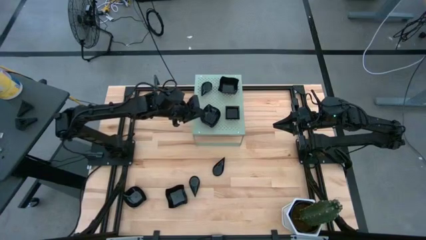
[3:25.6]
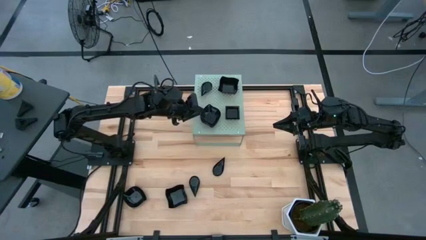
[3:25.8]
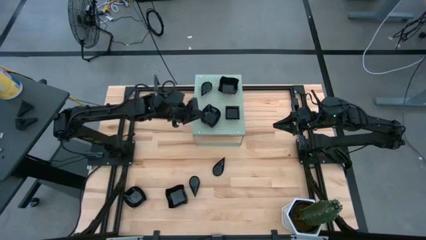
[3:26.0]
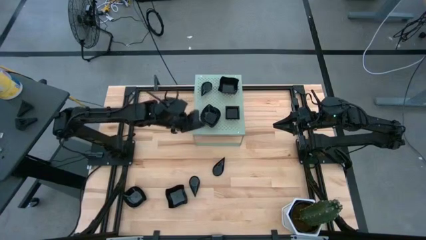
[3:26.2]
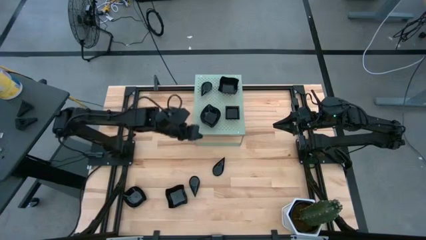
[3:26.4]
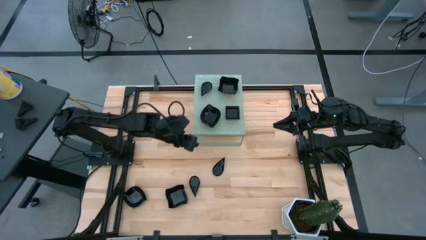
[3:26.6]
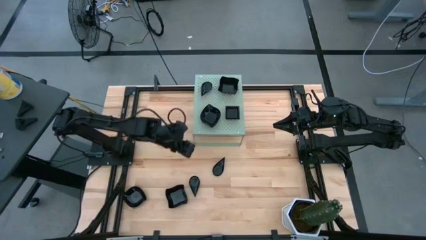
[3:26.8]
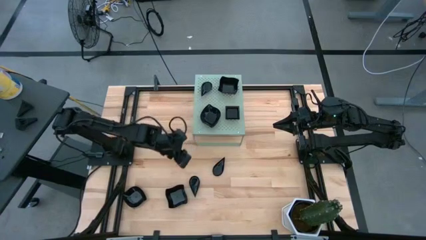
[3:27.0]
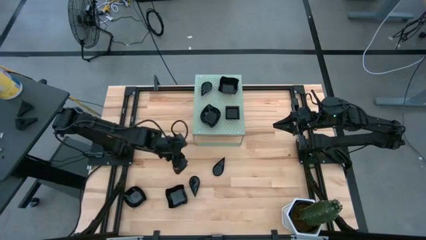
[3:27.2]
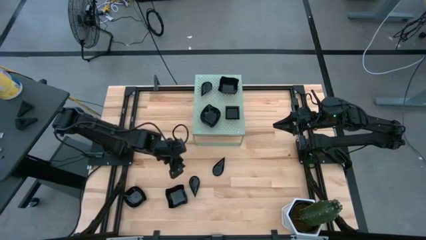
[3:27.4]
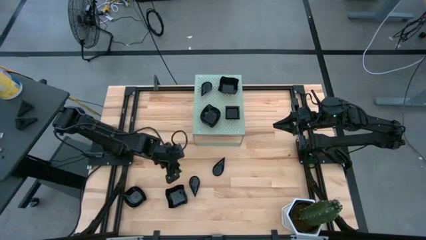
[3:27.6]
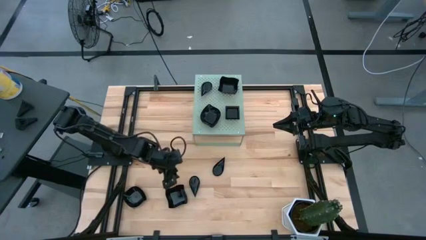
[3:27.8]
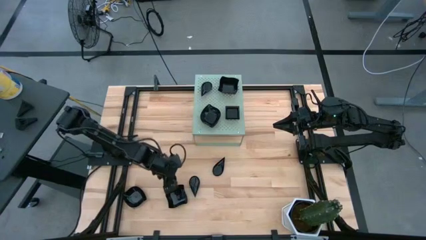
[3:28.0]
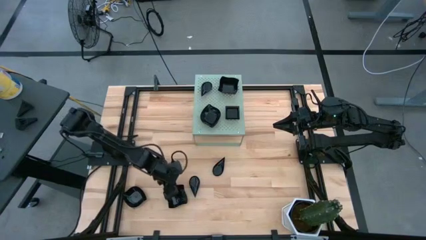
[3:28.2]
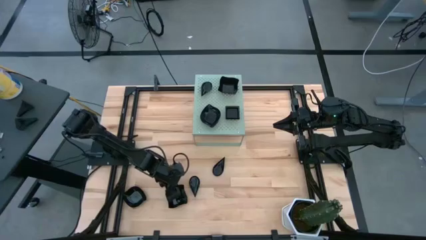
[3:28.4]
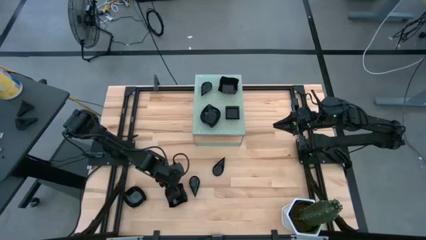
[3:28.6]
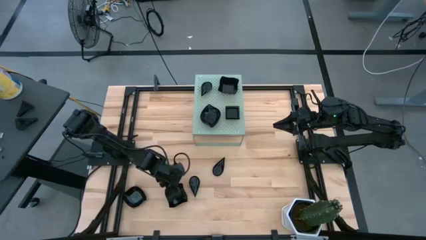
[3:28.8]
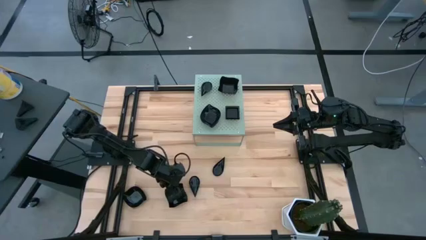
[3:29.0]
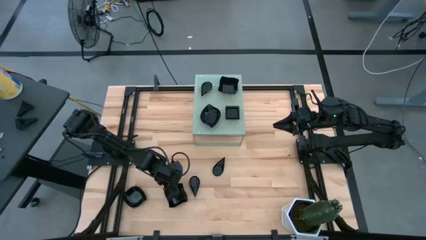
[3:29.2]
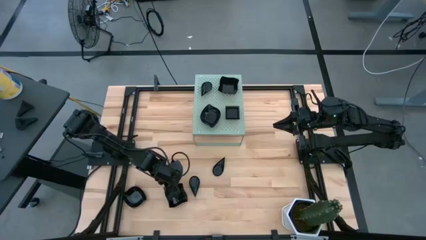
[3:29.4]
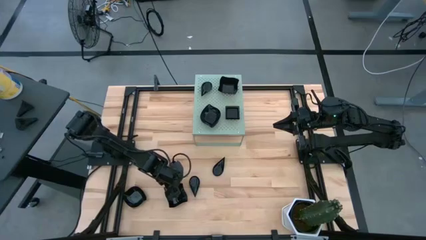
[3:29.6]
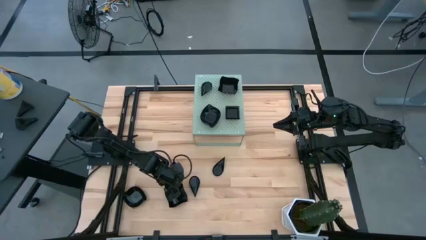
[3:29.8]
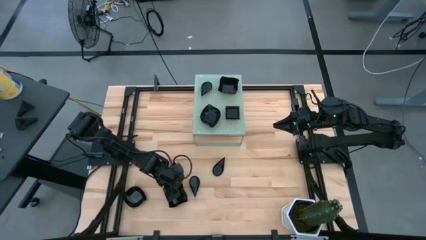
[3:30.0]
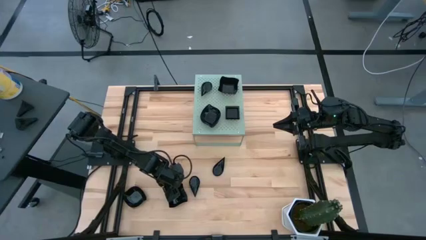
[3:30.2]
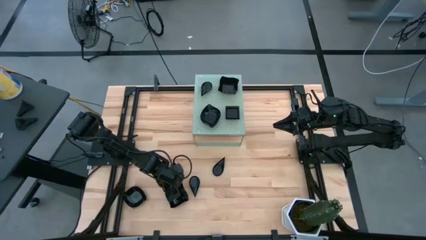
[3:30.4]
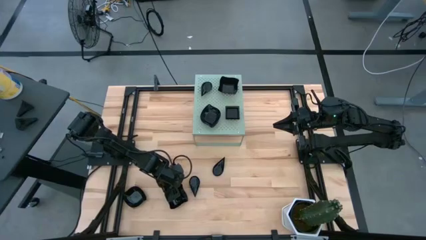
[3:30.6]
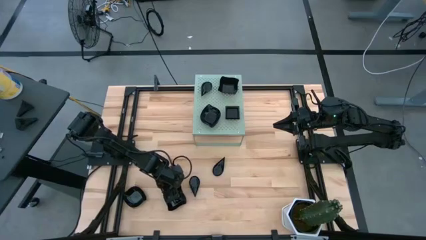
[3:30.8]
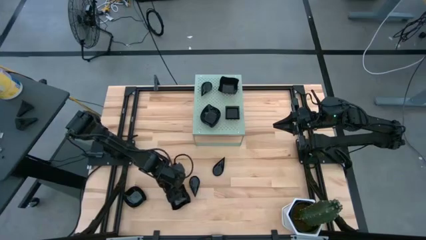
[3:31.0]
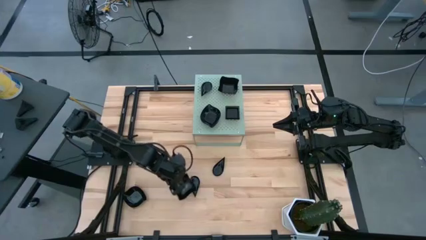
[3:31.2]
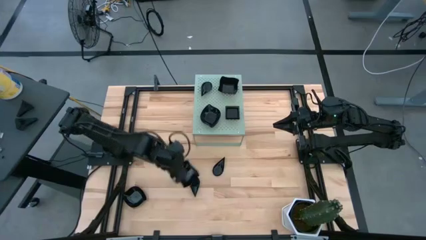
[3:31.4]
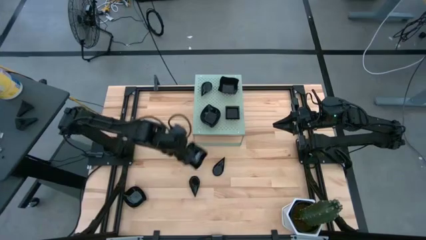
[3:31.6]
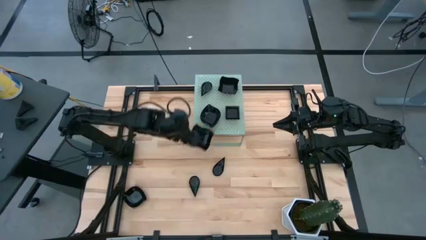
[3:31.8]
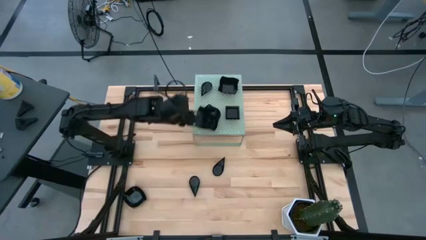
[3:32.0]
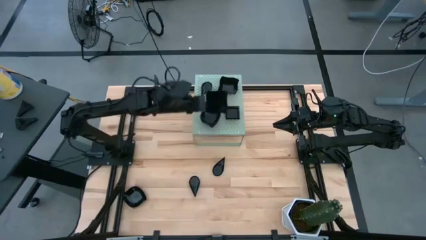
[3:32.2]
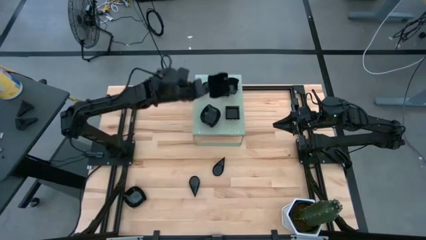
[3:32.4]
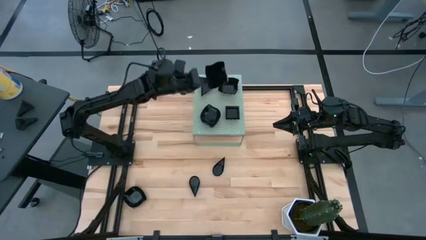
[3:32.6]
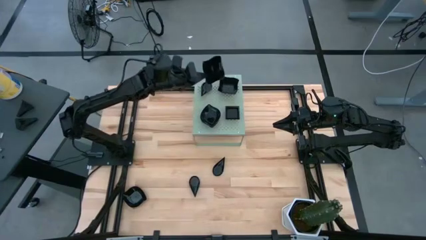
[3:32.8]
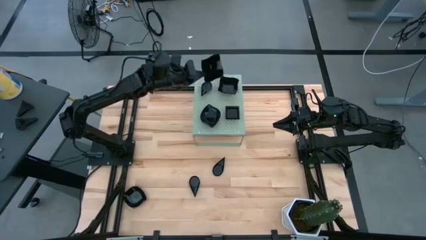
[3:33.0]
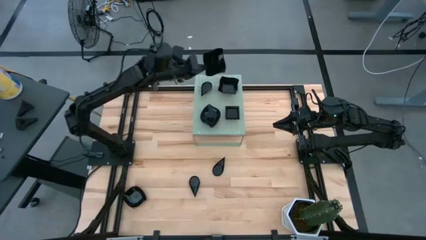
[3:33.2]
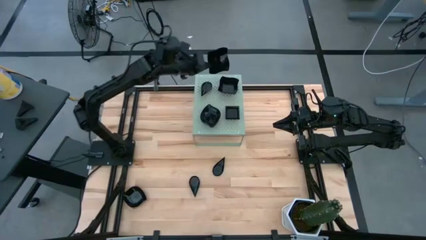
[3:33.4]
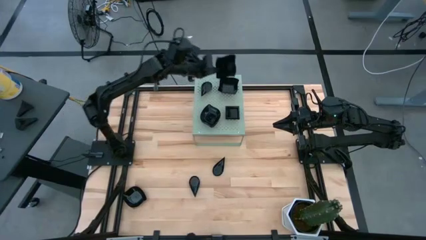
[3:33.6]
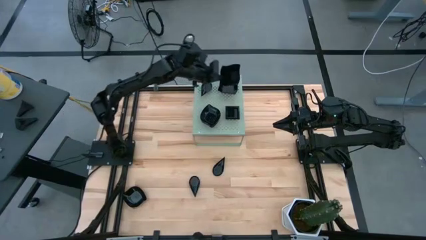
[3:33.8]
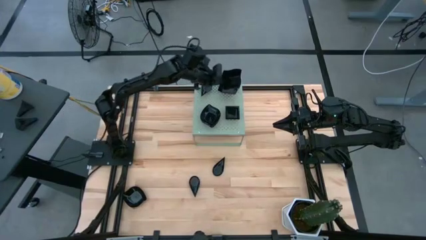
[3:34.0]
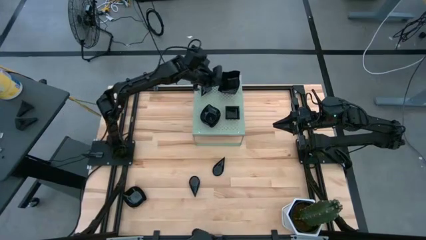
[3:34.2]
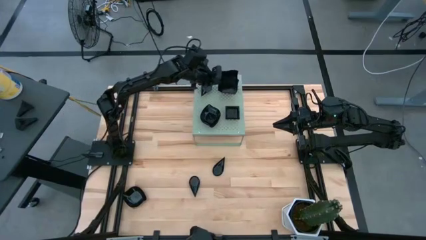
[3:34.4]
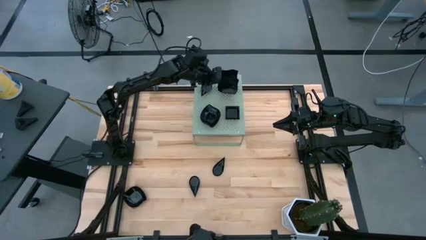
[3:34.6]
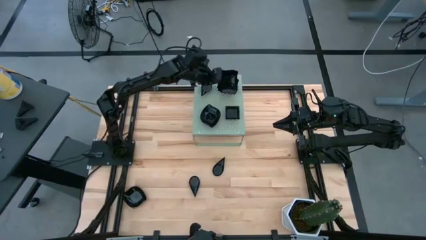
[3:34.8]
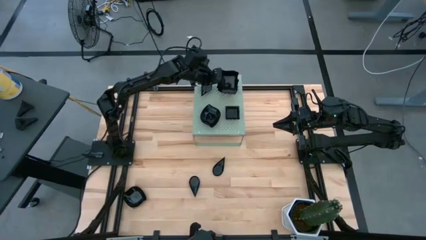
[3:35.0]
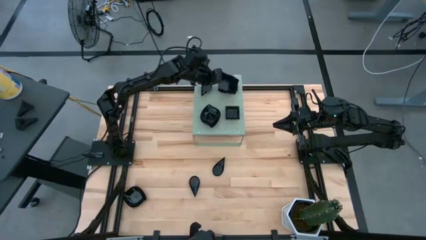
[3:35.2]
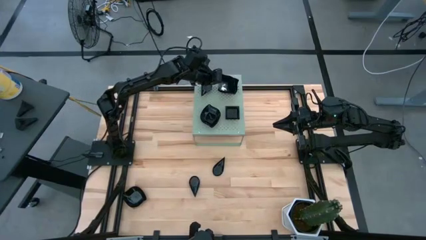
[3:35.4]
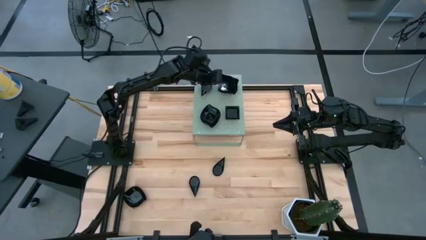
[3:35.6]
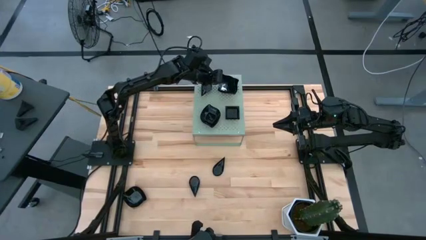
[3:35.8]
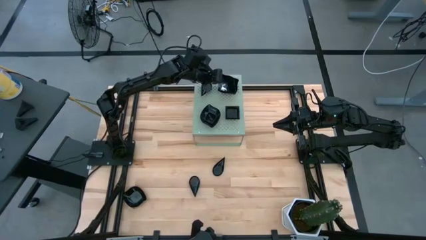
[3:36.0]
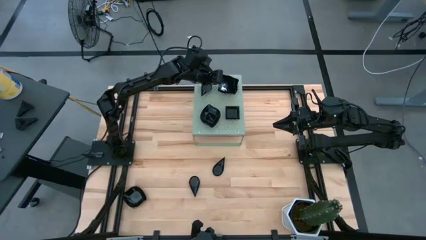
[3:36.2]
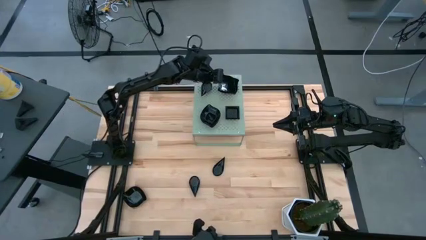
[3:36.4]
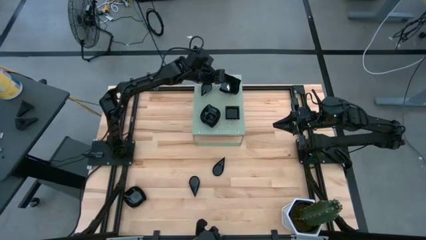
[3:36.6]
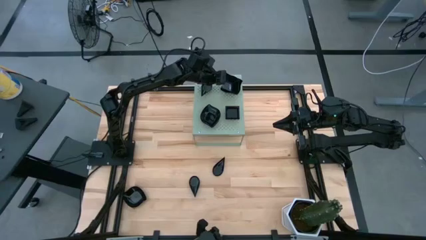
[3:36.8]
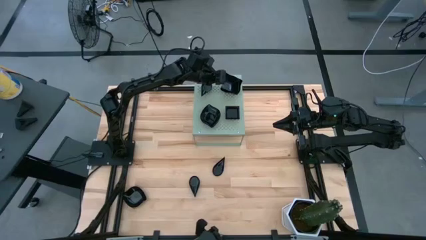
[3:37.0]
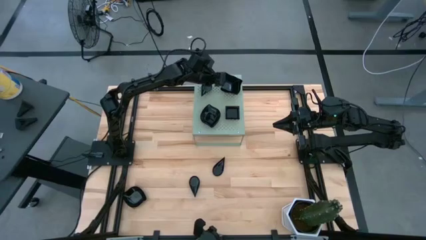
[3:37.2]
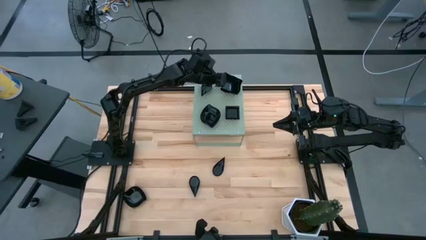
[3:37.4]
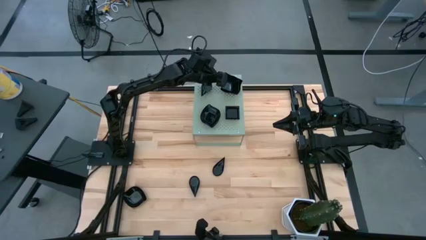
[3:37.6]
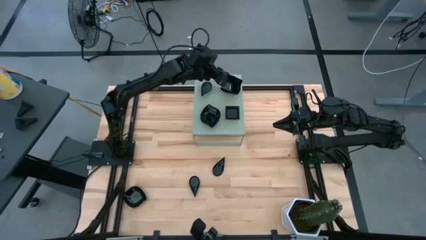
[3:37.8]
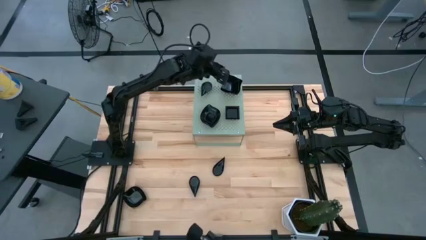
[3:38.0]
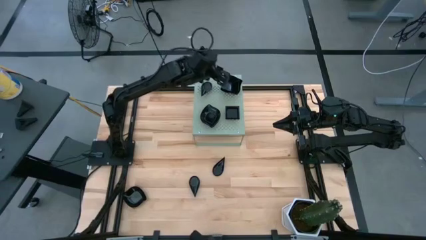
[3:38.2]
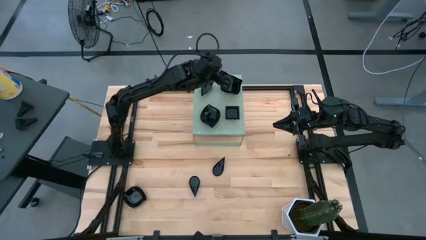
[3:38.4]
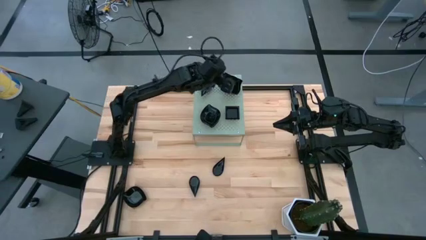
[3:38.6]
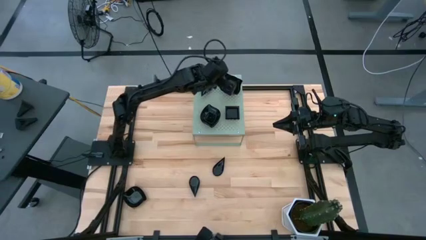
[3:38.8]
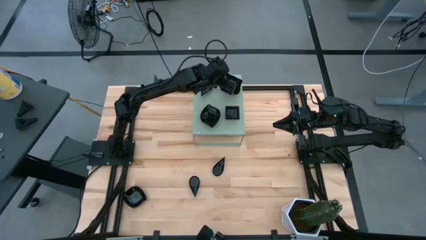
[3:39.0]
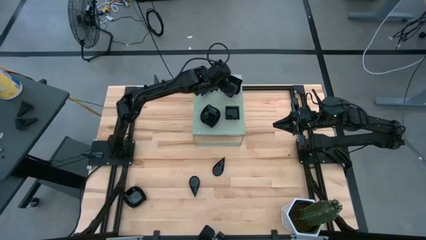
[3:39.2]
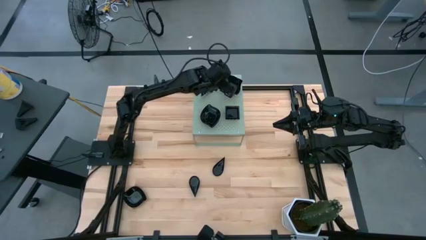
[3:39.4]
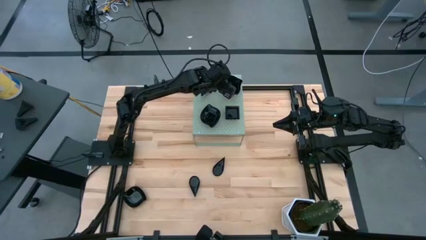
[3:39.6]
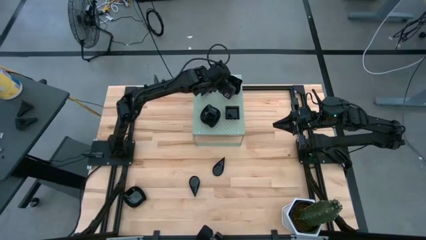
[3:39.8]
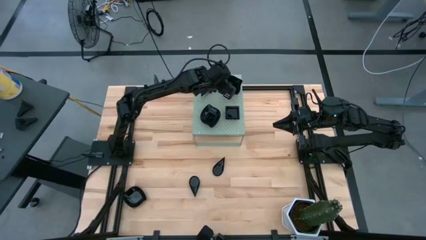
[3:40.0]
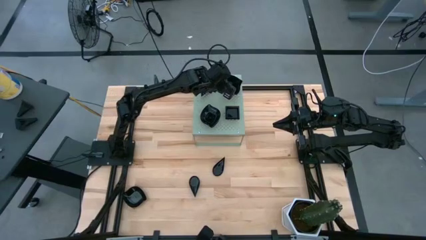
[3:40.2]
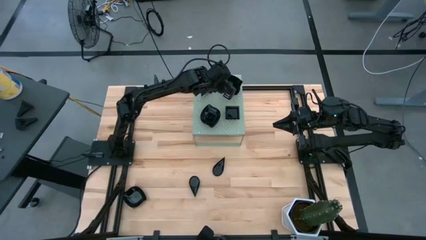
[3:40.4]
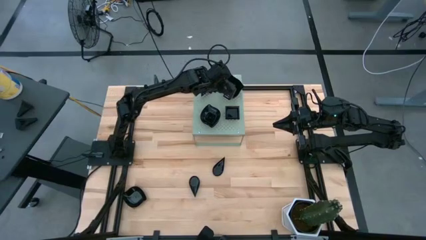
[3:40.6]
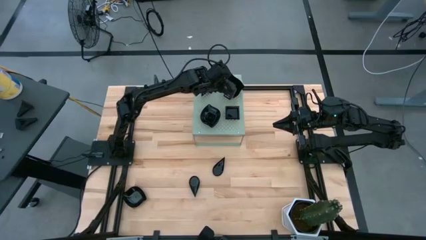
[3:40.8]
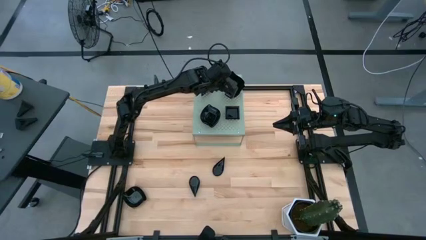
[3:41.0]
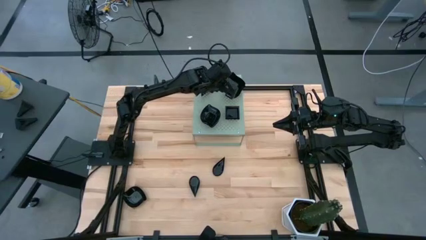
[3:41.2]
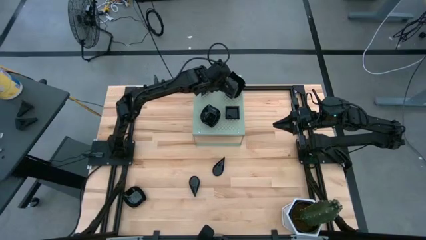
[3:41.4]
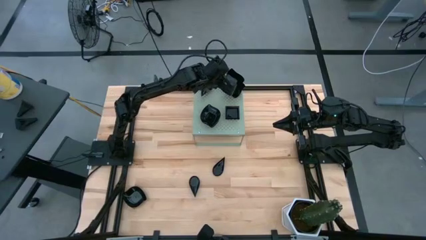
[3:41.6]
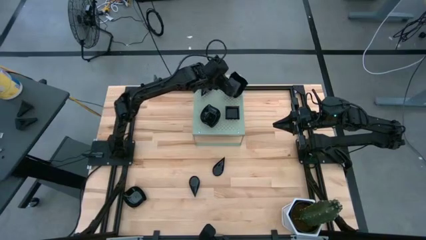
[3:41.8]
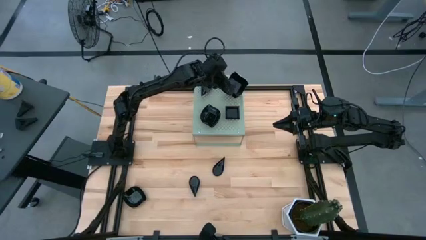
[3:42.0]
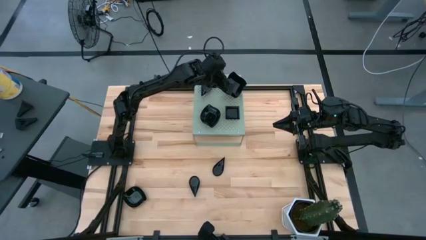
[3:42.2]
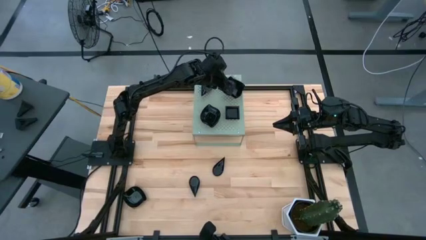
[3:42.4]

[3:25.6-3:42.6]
Task: Pick & Place Mini shaped plates
Stack the distorted square plate on top of the distorted square plates on the shelf
